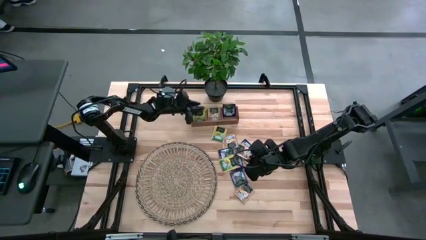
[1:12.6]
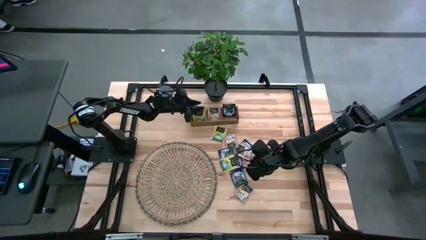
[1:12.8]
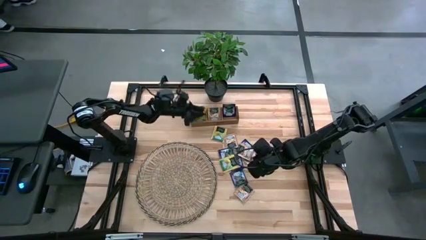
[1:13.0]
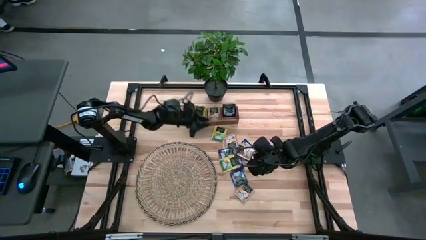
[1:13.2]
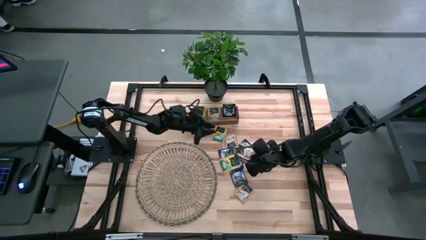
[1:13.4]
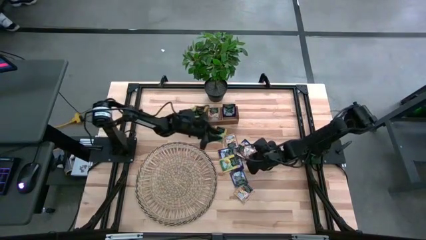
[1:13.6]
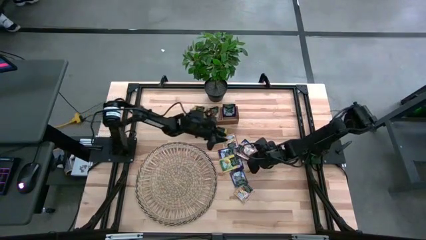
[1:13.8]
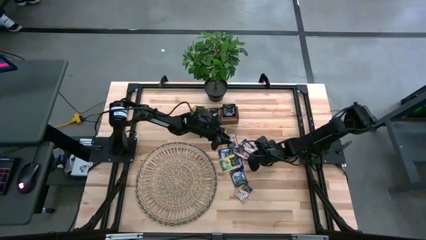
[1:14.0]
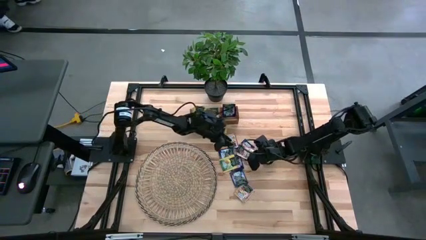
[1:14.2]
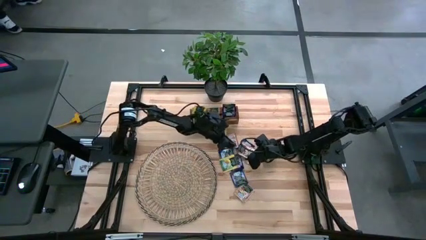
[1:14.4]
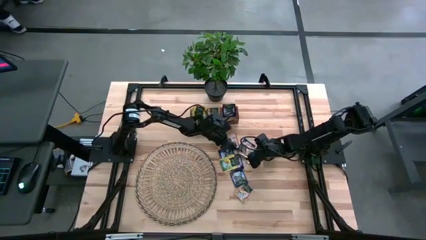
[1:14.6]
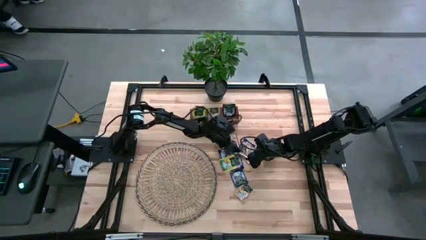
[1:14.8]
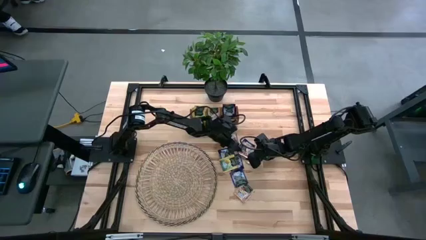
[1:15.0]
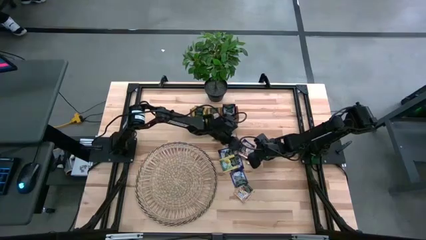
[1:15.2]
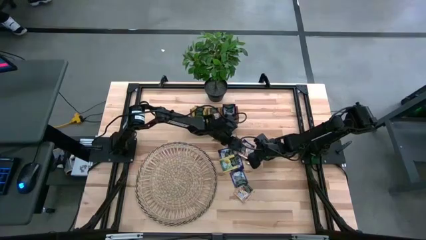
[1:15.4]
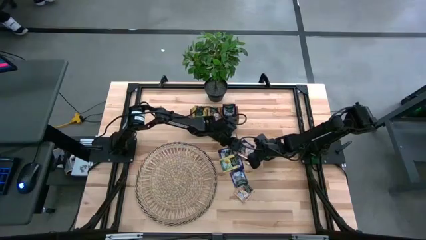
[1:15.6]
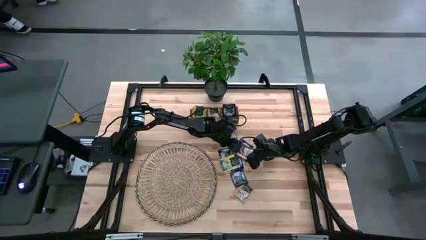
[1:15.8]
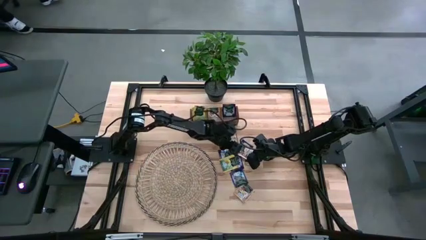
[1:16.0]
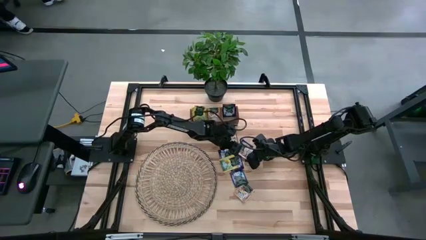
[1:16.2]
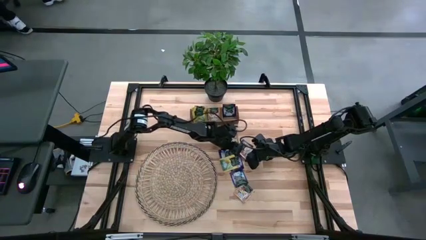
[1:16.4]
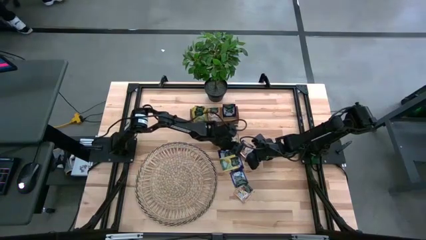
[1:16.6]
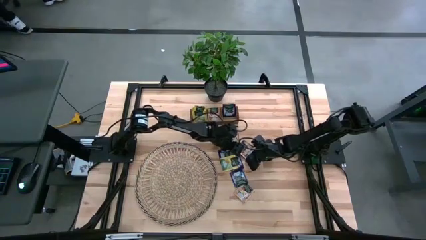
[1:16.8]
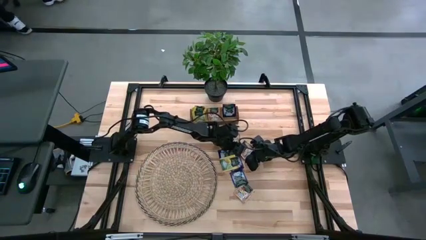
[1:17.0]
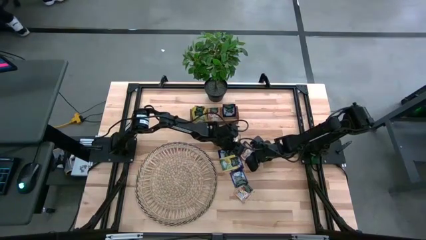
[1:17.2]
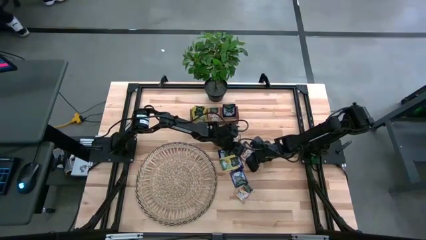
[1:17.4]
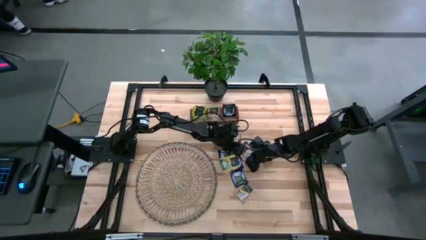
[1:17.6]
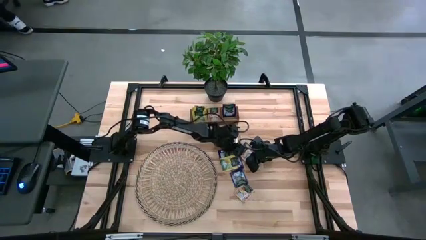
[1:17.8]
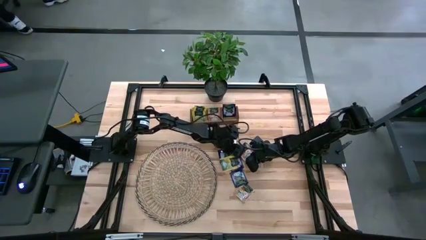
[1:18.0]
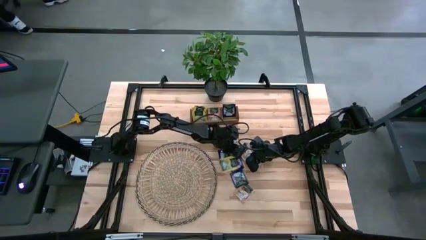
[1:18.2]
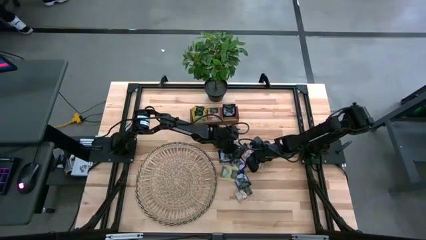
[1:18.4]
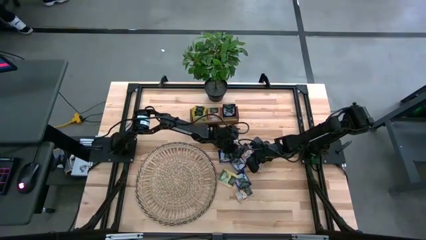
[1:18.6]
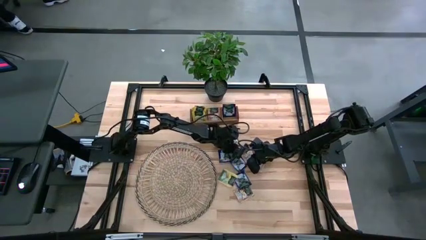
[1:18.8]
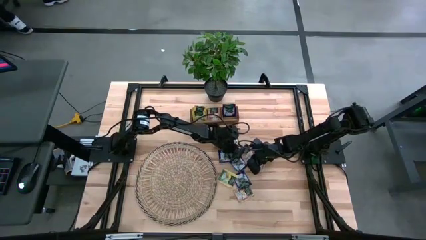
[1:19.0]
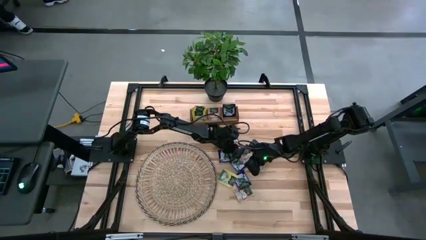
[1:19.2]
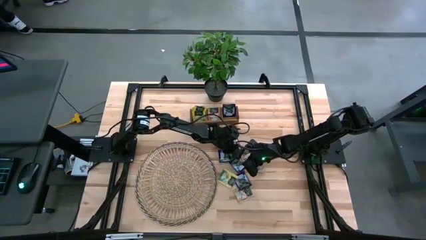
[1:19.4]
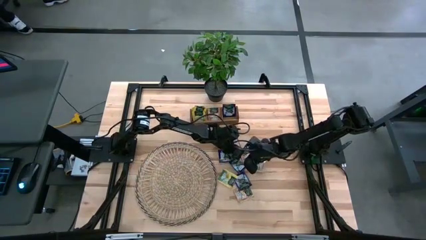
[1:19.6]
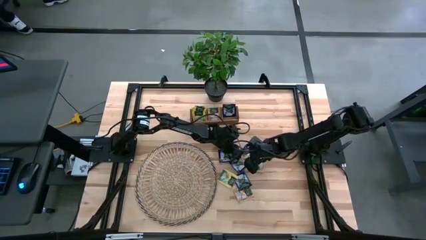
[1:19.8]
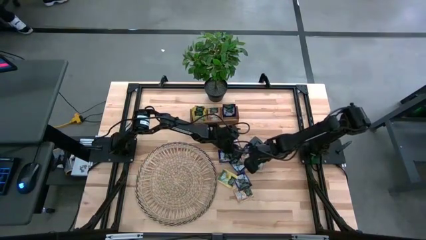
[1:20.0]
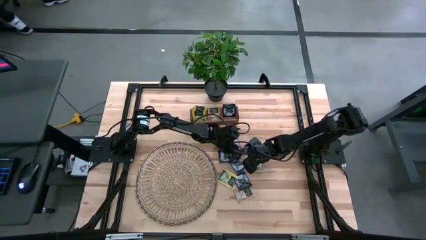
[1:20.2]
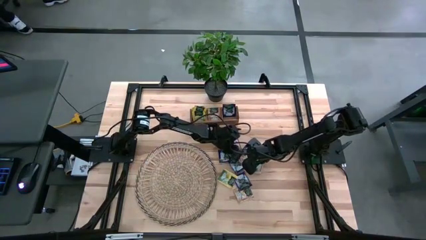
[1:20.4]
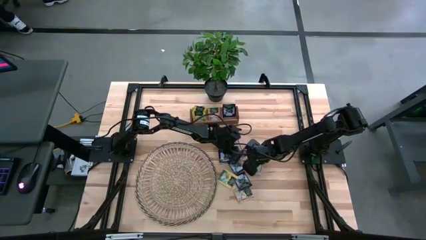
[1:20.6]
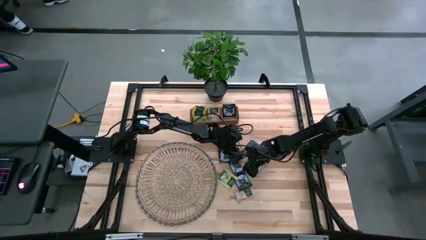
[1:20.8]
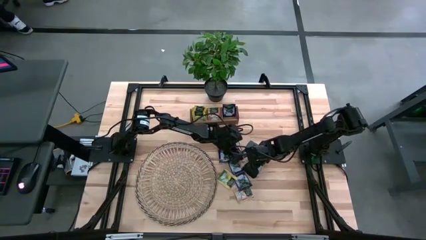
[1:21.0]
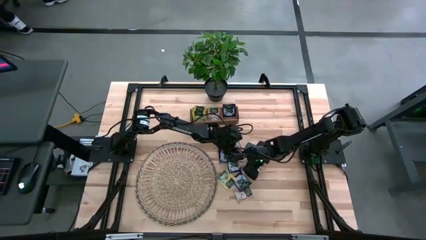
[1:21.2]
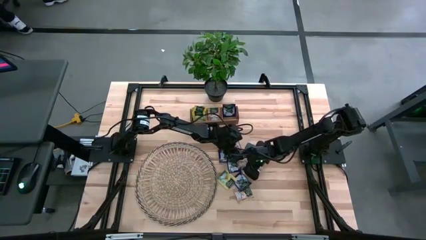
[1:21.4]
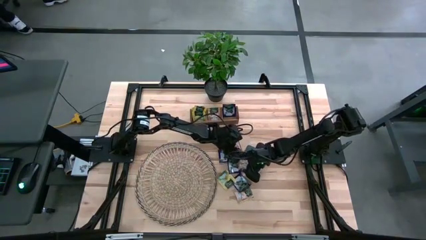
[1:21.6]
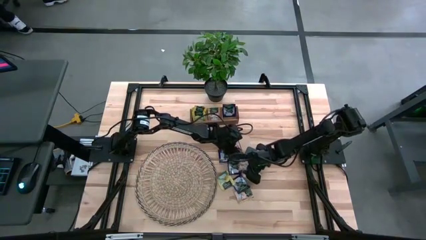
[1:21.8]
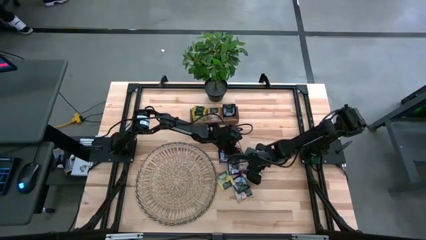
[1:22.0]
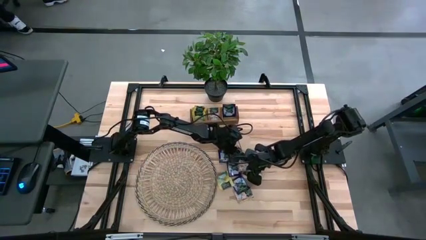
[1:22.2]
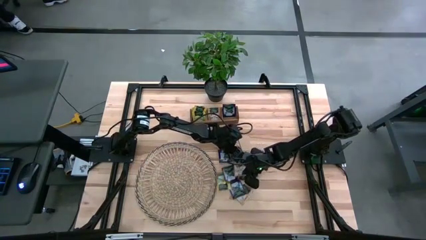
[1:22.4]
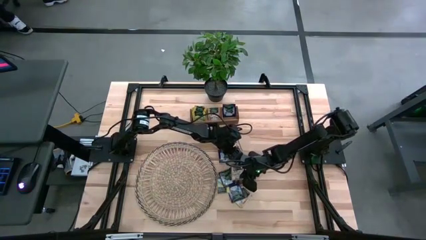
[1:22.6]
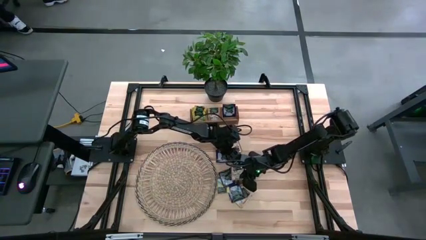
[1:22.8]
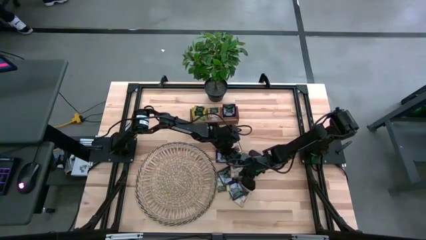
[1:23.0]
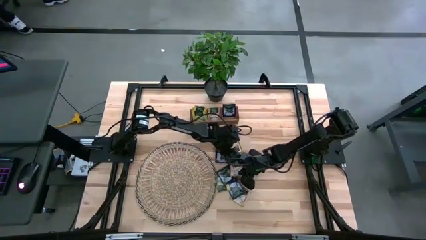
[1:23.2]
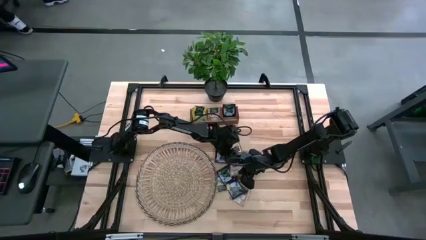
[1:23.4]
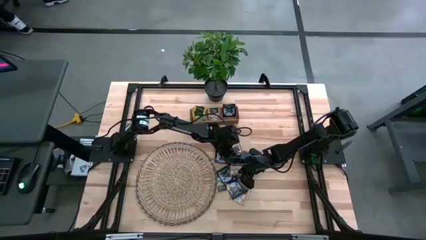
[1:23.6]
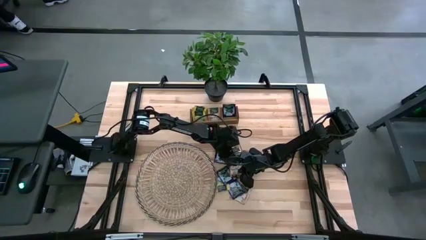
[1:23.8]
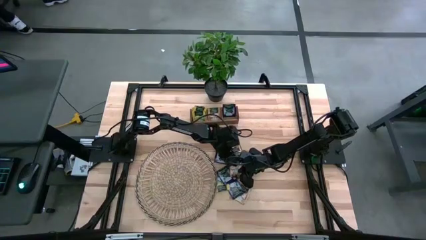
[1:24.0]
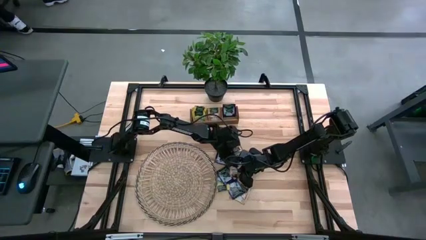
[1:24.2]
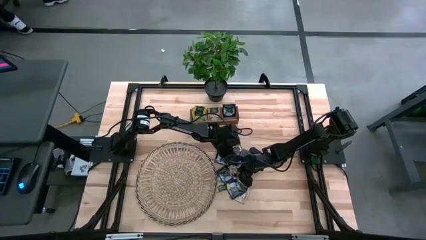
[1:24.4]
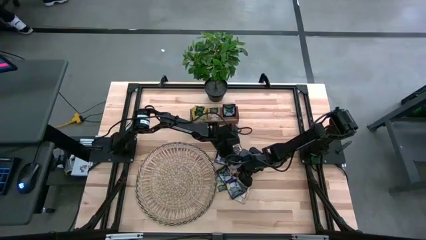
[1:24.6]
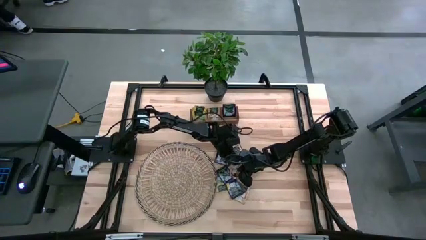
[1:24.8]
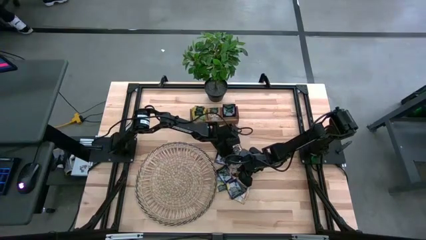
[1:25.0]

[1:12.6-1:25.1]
Task: Pick & Place Tea
Put the brown tea bag into the middle section of the wooden organizer

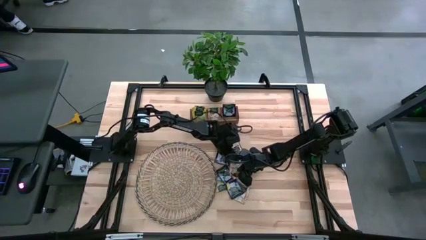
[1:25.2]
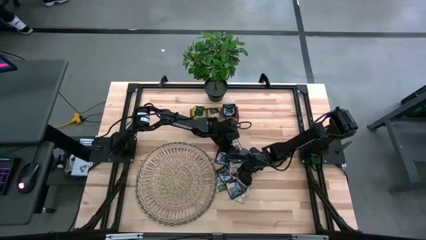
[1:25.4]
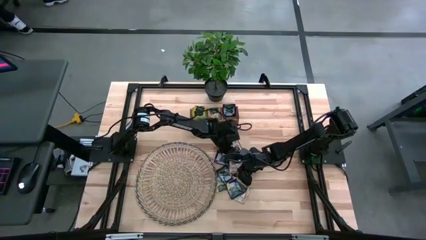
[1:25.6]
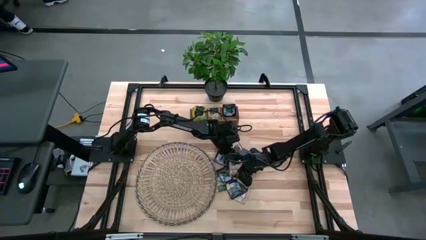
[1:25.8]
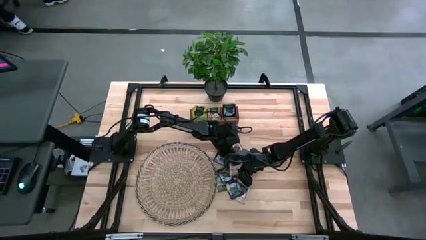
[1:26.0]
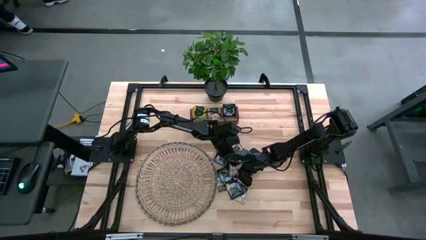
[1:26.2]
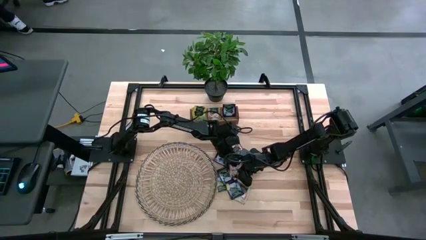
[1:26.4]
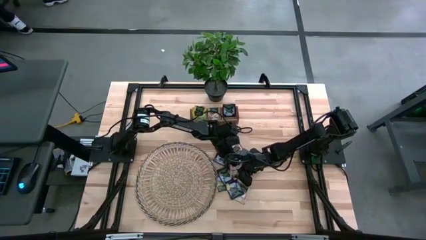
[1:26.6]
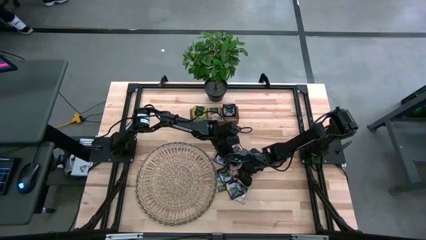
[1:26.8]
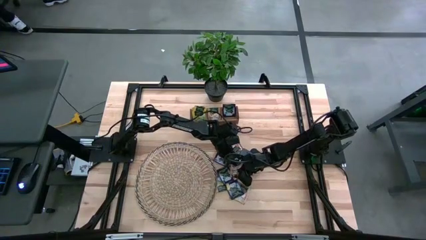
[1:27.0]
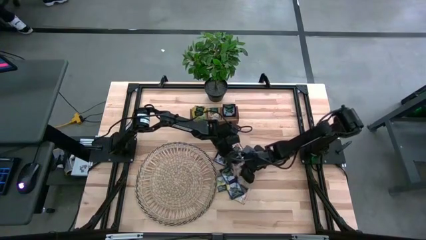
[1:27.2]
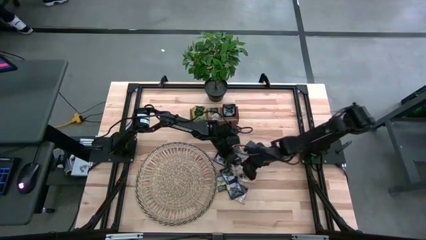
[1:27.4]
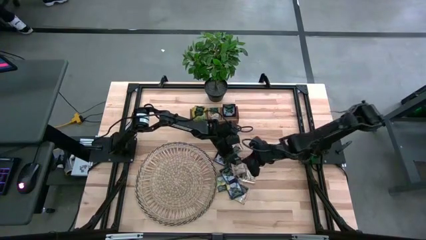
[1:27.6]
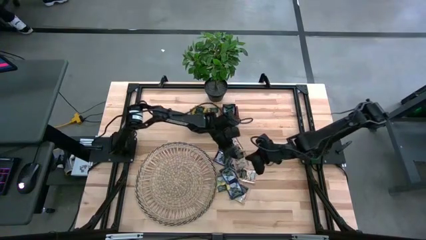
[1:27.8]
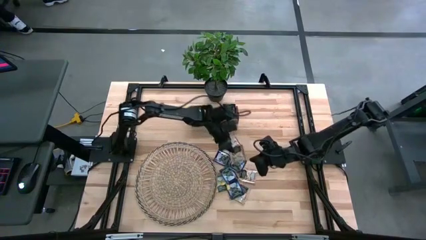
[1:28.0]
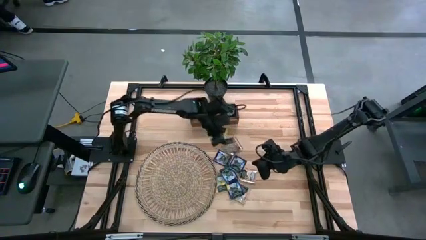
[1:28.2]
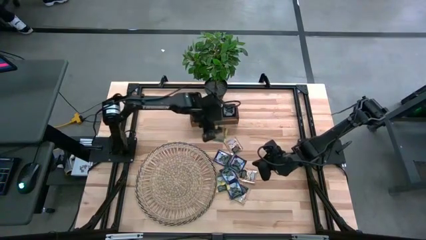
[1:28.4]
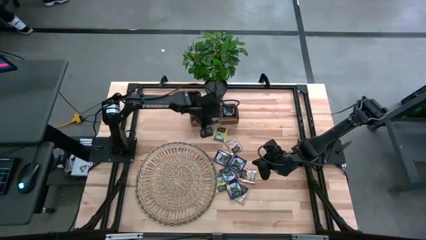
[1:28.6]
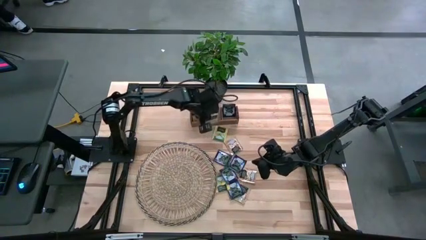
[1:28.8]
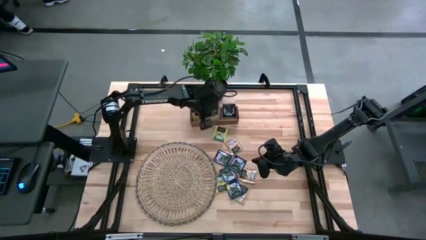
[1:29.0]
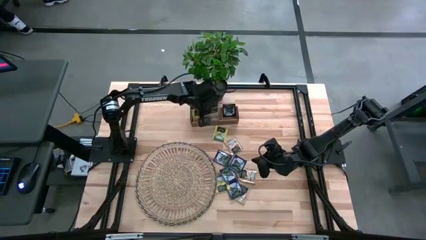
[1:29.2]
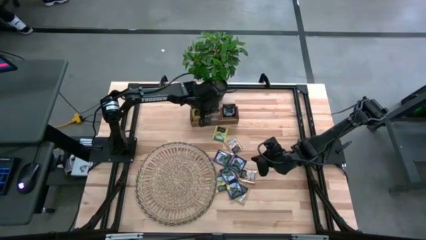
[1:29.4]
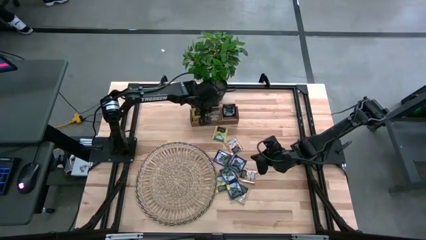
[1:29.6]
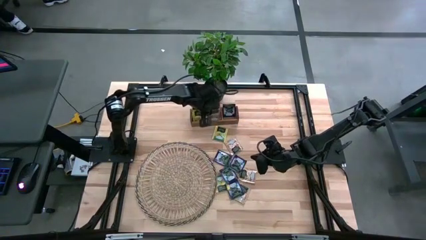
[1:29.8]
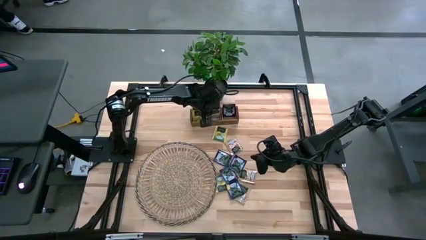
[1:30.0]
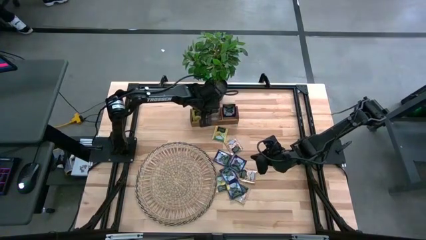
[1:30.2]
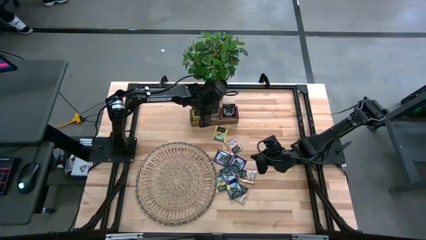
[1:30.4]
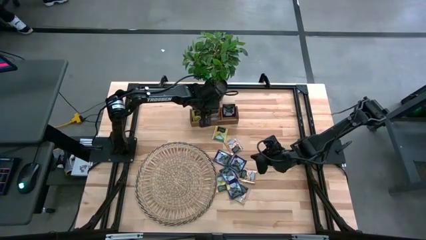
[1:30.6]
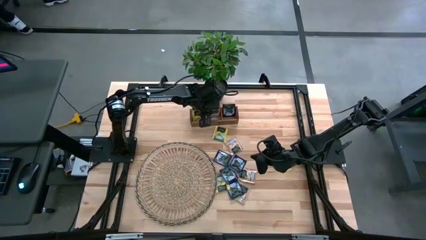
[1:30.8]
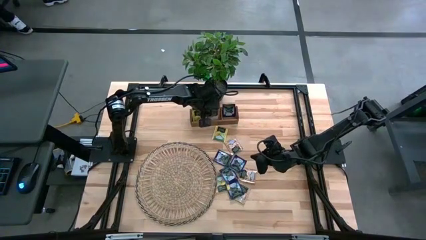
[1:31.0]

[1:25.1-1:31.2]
Put the brown tea bag into the middle section of the wooden organizer
